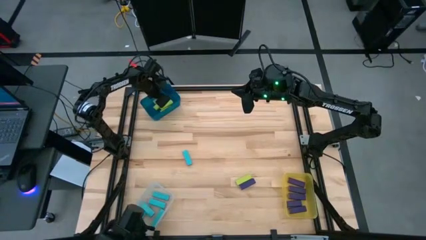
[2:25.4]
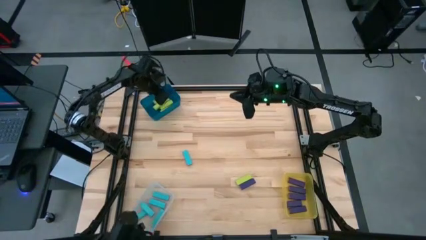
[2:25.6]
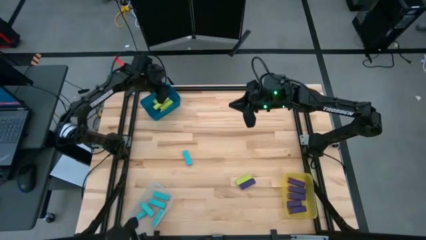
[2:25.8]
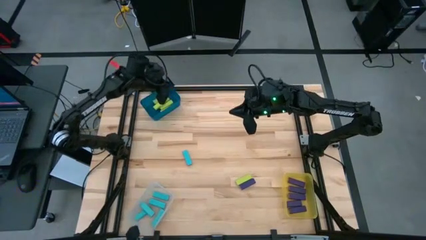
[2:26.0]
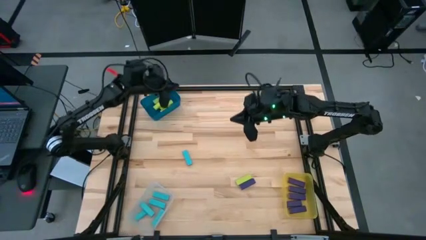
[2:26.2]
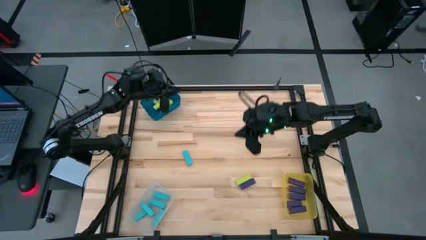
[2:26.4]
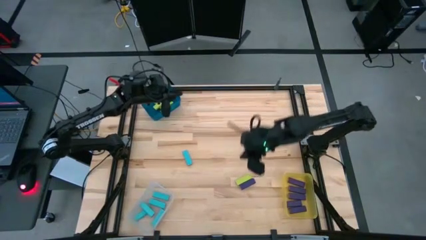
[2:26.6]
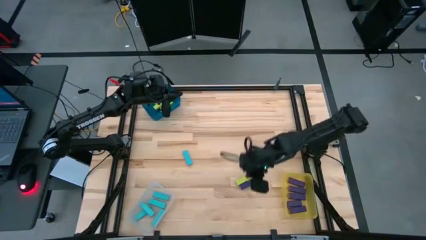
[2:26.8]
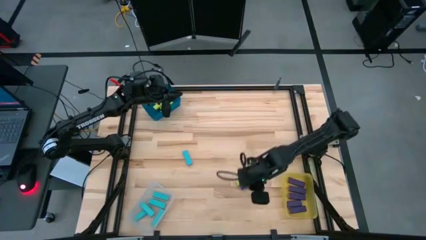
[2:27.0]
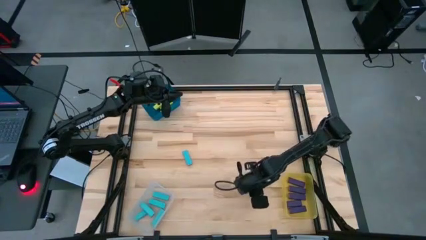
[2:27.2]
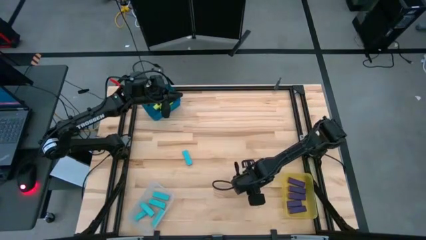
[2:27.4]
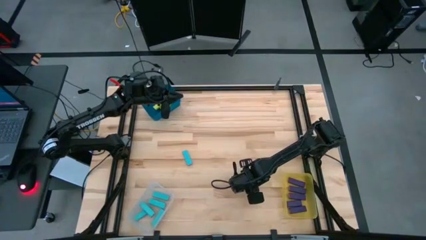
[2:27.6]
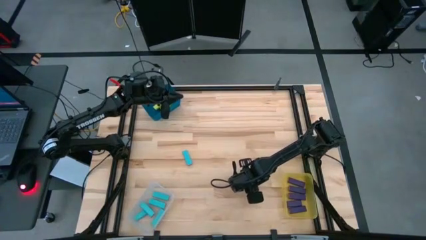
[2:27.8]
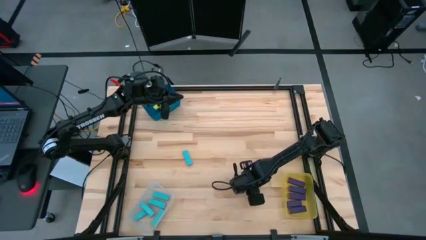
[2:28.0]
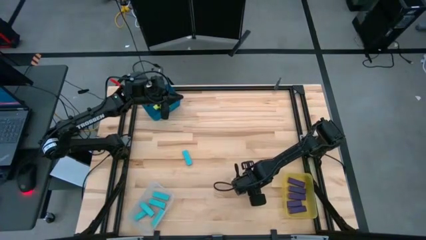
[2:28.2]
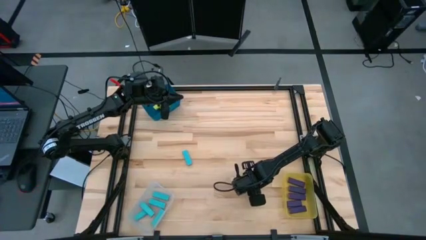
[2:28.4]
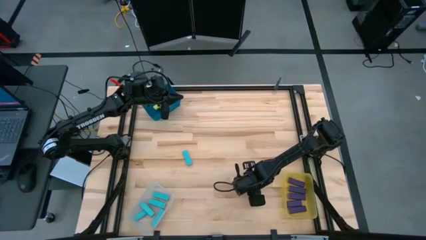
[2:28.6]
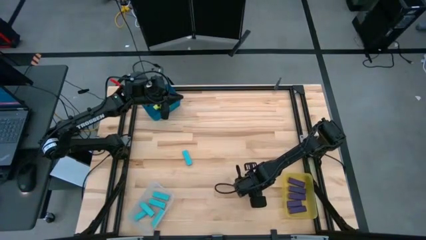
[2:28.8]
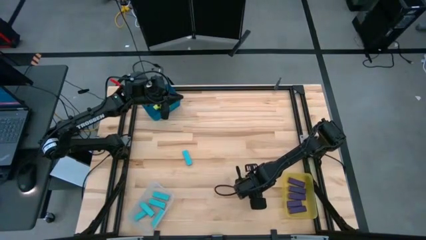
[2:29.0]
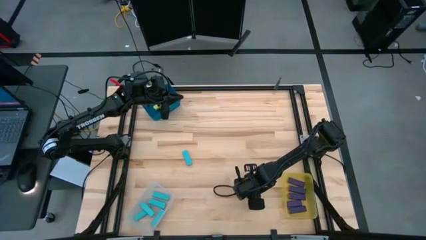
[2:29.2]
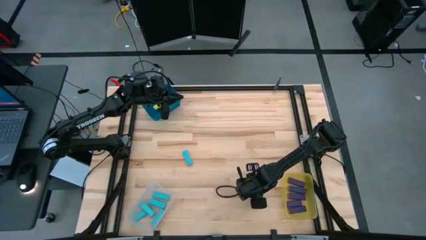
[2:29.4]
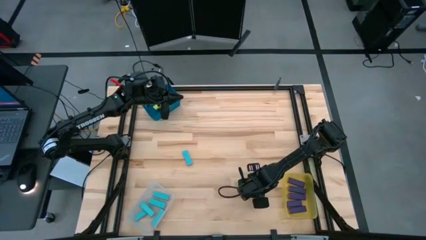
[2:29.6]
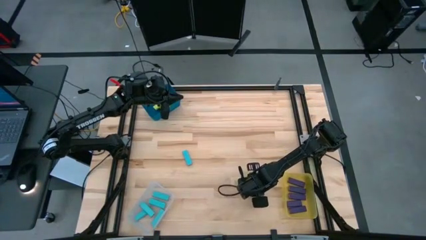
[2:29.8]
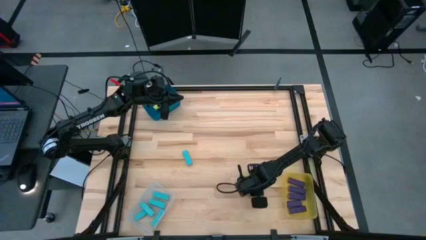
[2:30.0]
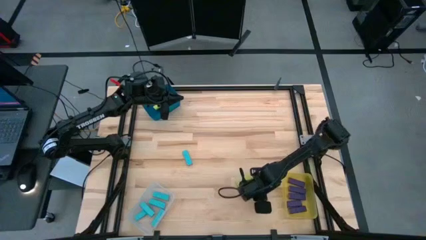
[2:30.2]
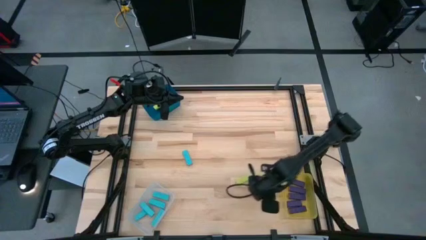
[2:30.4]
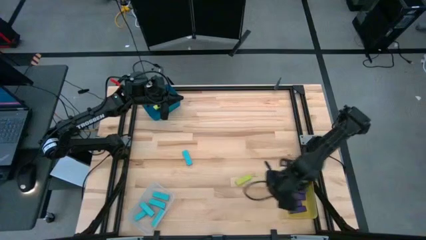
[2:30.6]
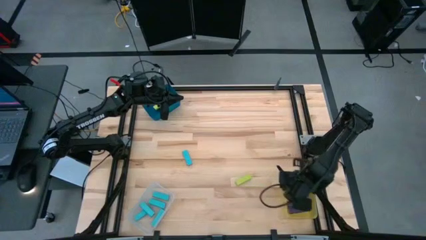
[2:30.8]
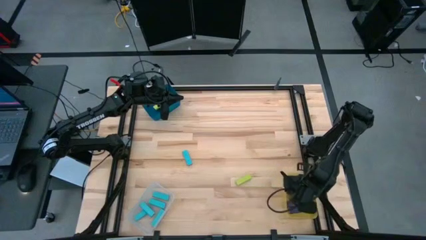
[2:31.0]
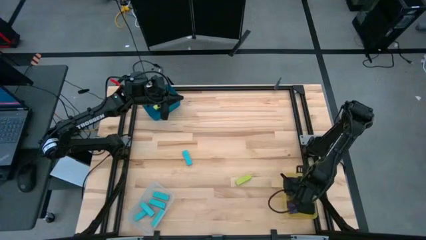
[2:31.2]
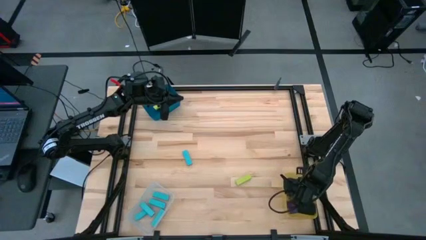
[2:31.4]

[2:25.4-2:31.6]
Task: Sort blocks
Put the violet block into the yellow bin

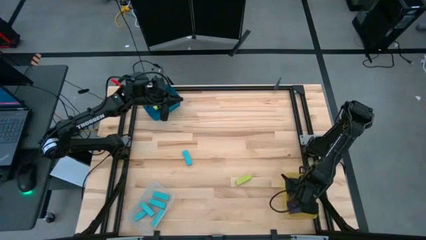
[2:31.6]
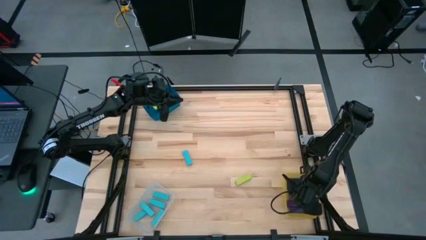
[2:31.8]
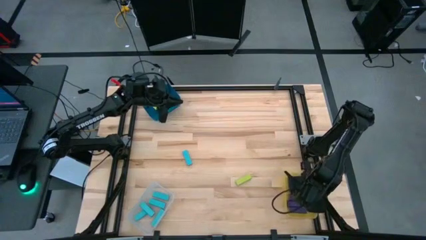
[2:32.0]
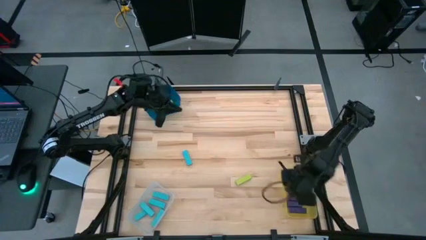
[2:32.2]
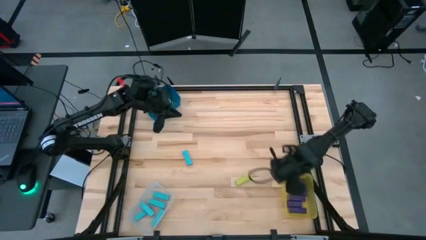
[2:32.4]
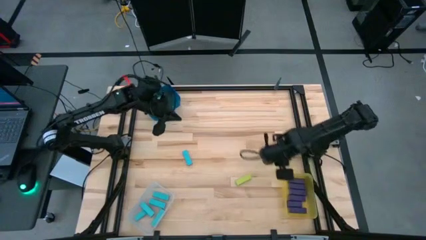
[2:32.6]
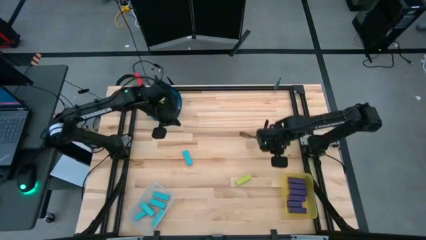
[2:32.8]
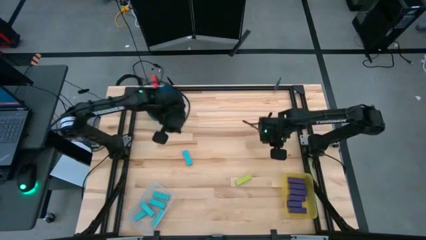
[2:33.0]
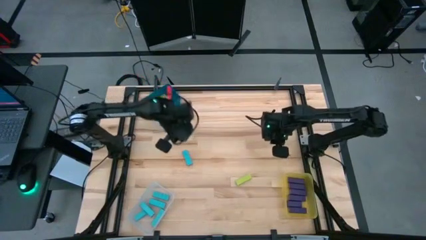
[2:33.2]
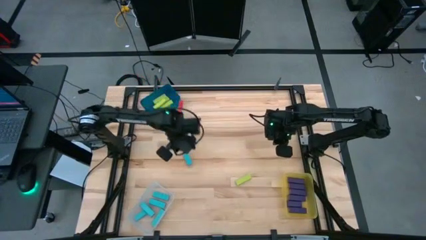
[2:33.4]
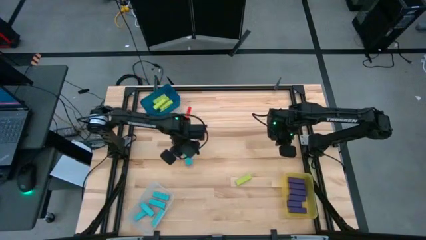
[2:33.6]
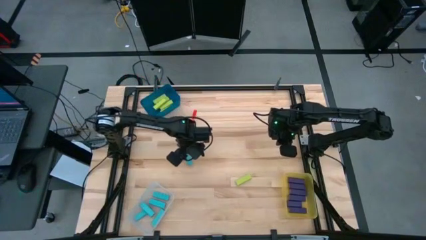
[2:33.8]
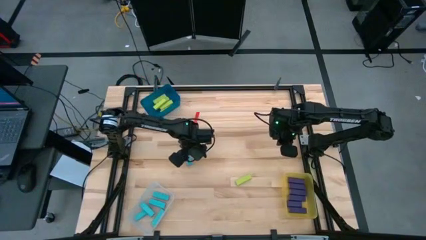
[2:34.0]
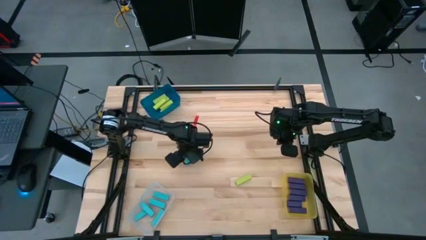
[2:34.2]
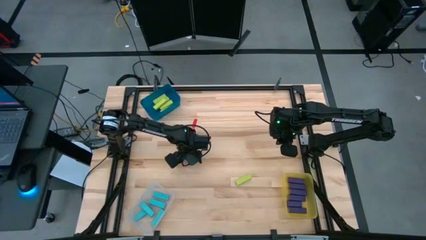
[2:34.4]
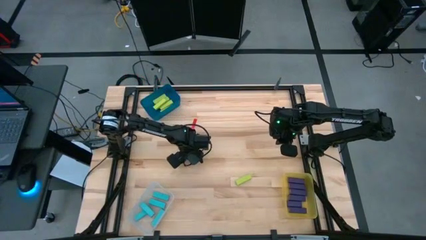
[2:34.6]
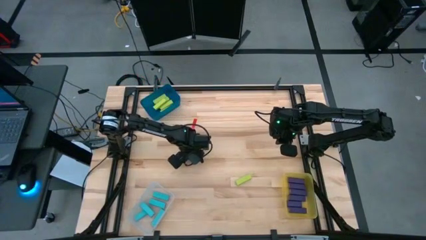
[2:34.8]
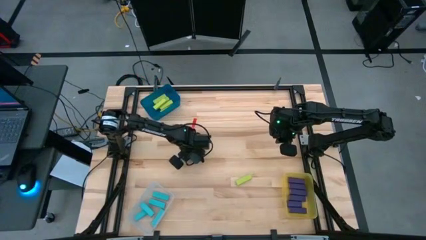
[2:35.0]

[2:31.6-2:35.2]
Put the blue block into the transparent bin

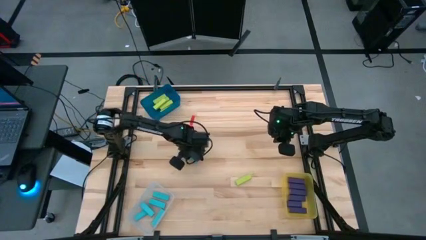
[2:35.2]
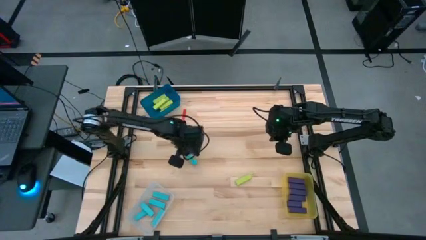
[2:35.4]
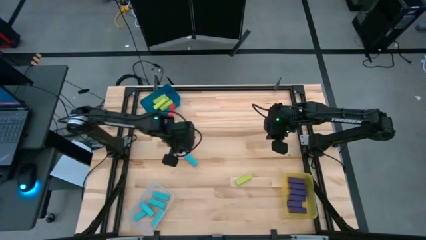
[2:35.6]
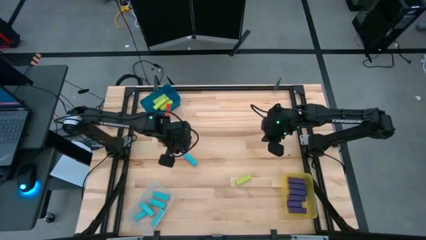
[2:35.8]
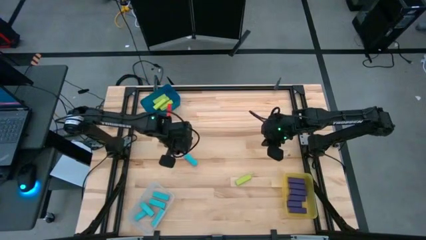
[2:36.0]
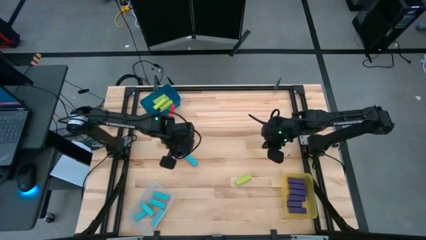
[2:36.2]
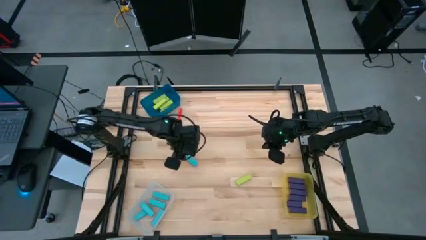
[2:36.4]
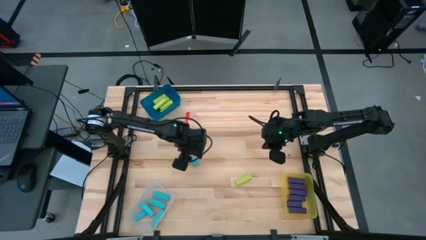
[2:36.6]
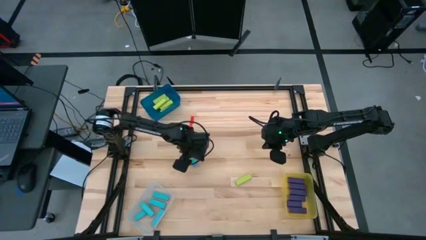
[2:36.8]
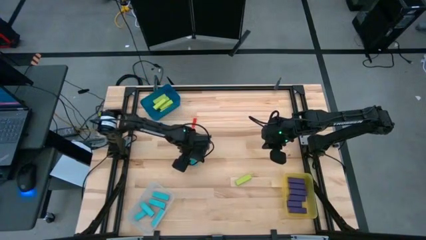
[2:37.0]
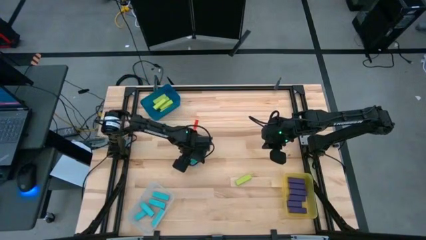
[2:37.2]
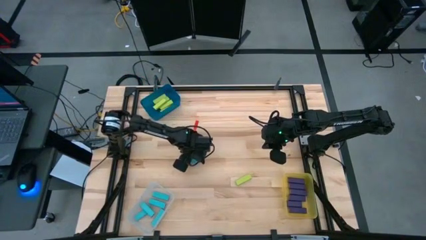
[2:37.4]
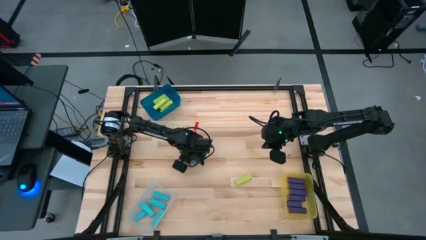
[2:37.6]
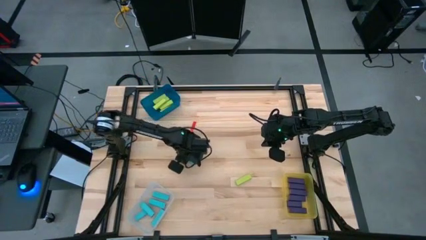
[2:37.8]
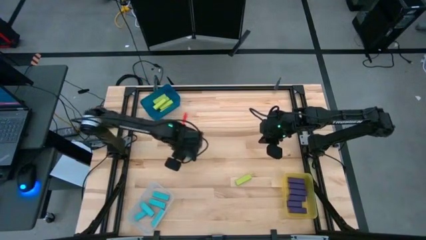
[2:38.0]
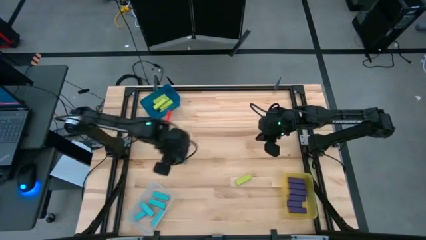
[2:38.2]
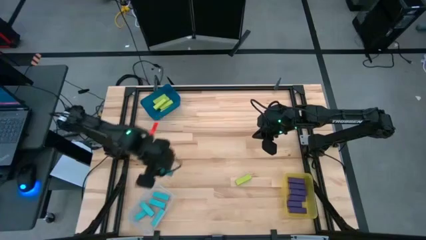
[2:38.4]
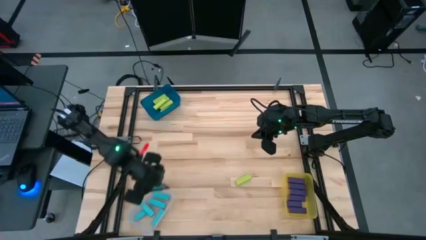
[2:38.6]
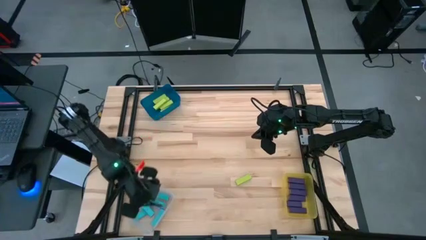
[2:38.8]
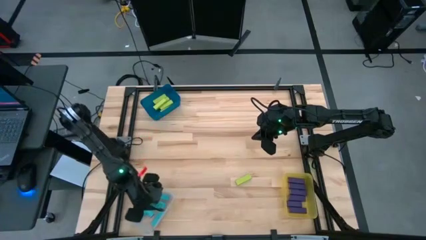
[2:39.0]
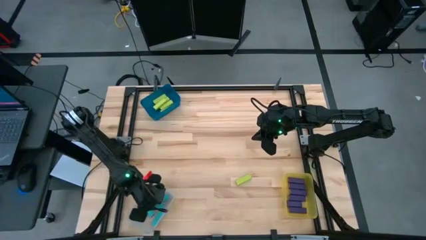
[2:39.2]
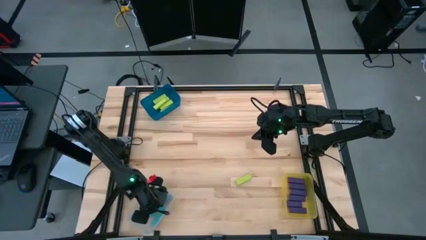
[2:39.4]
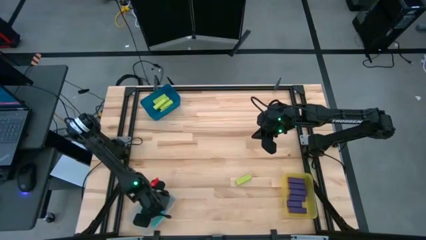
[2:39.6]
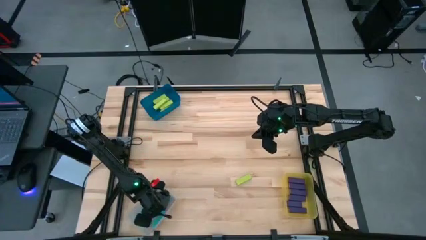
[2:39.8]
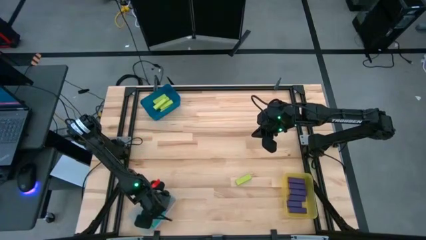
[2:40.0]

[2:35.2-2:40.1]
Put the blue block into the transparent bin

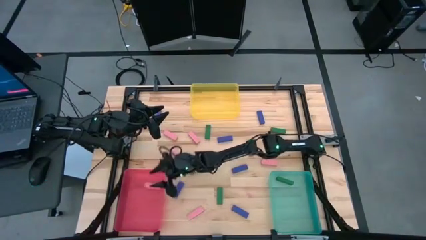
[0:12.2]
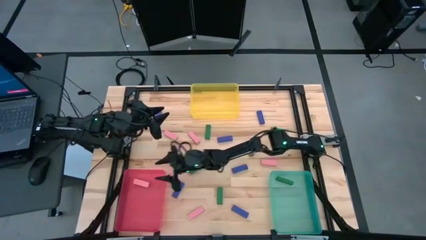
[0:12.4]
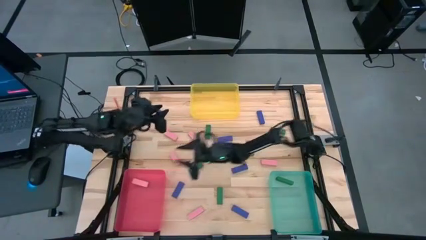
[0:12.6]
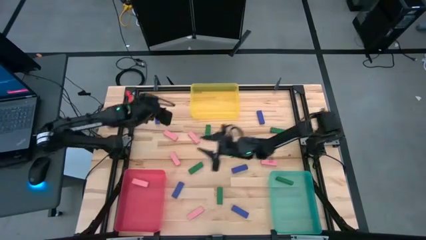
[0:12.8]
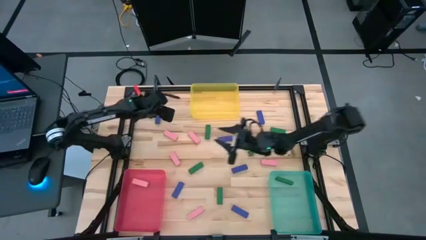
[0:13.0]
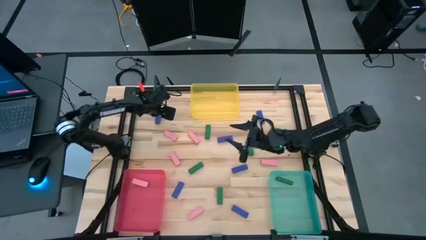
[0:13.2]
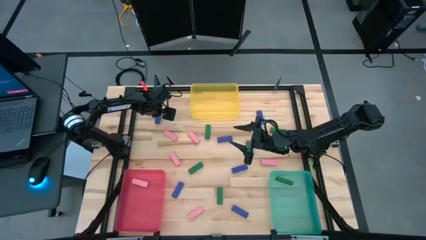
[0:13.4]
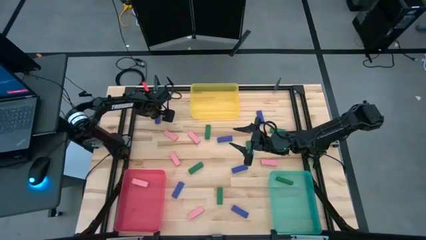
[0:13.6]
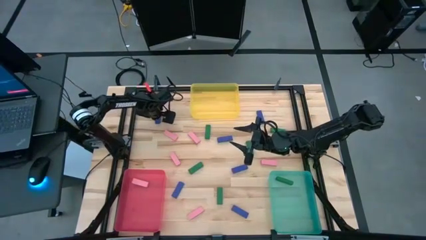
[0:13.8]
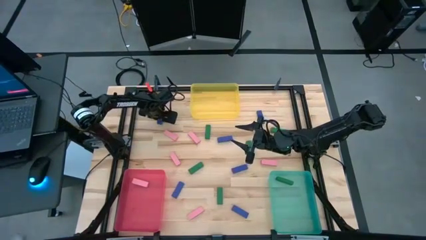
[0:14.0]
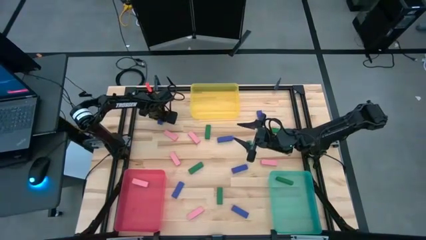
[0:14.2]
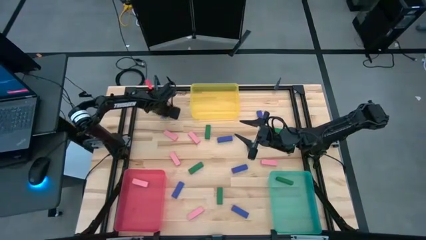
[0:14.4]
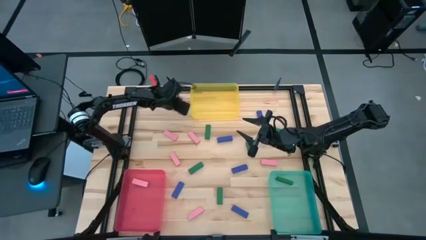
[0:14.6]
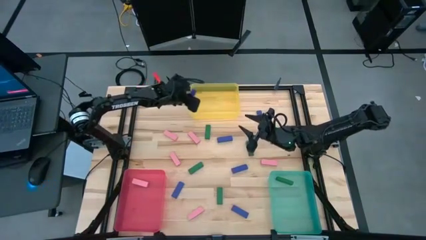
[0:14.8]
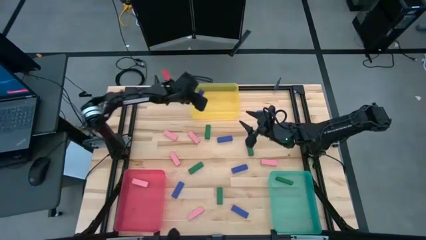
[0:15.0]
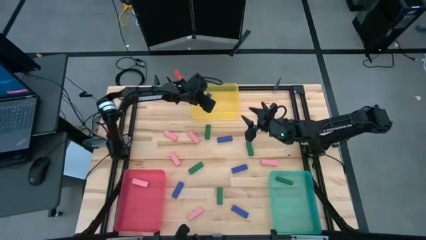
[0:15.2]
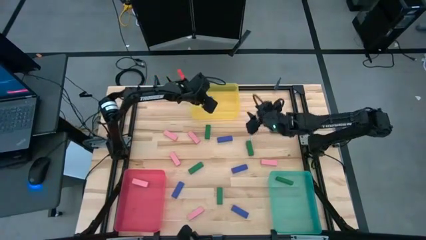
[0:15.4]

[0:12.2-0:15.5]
Task: Sort blocks
Put the blue block into the yellow bin
